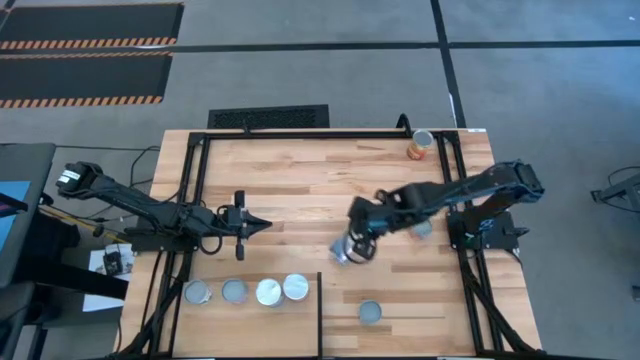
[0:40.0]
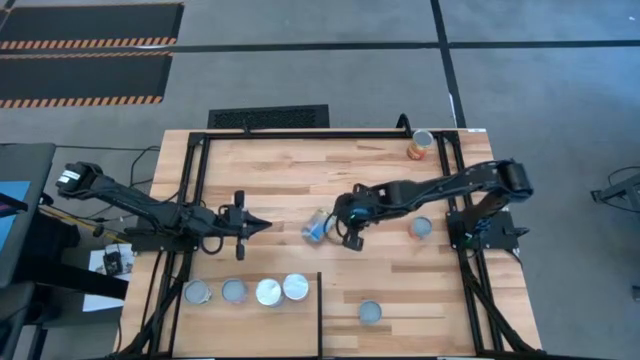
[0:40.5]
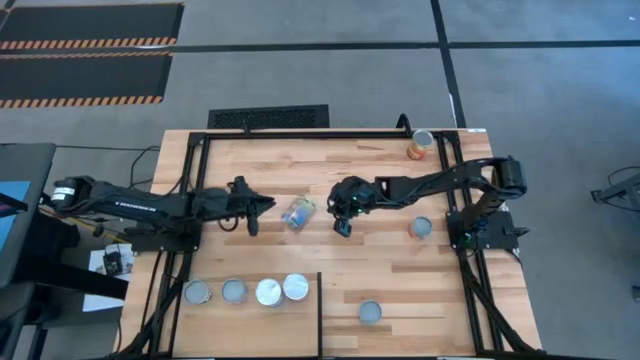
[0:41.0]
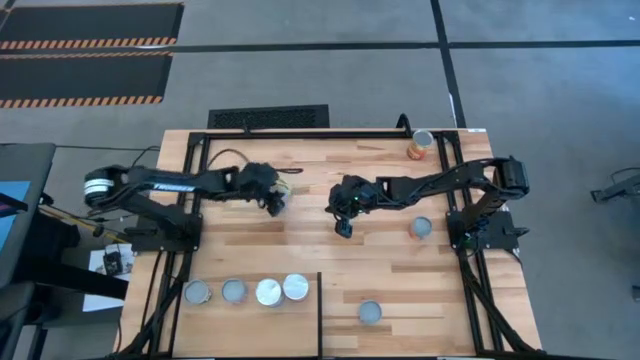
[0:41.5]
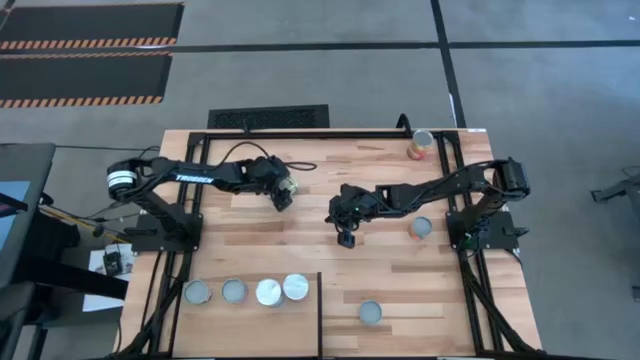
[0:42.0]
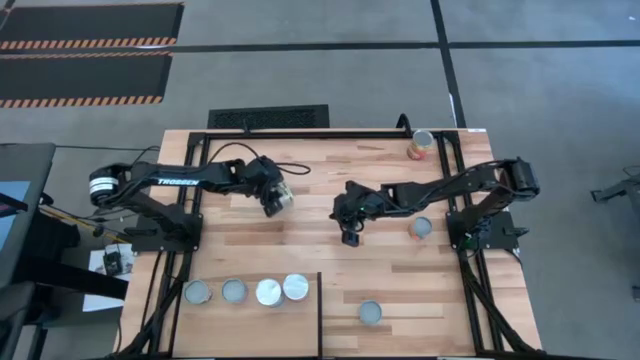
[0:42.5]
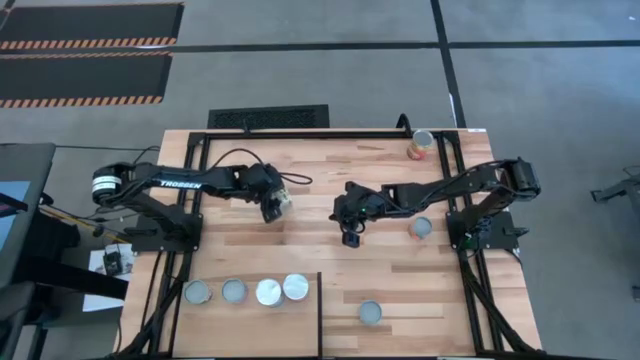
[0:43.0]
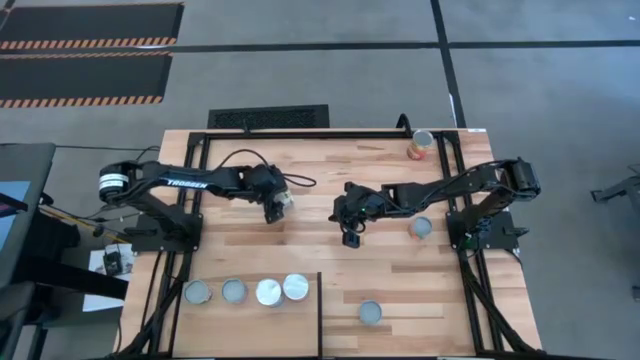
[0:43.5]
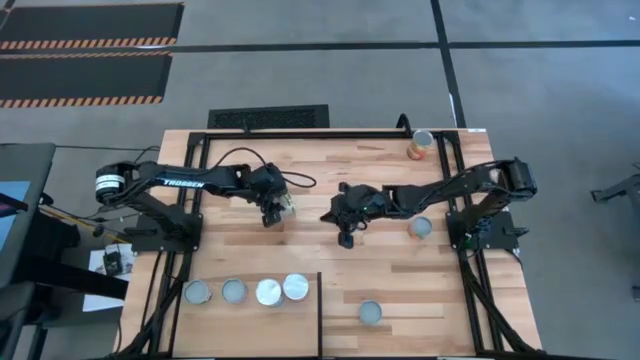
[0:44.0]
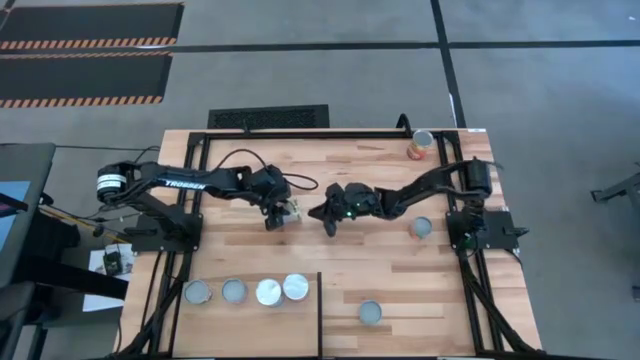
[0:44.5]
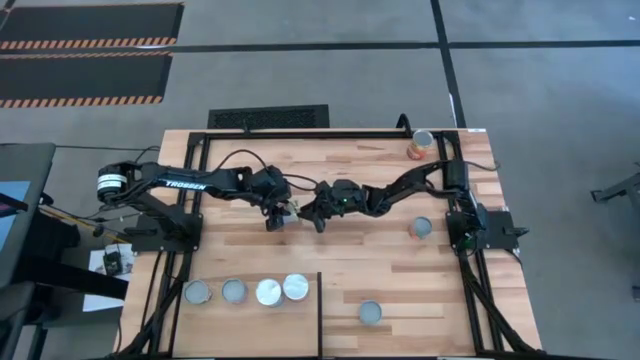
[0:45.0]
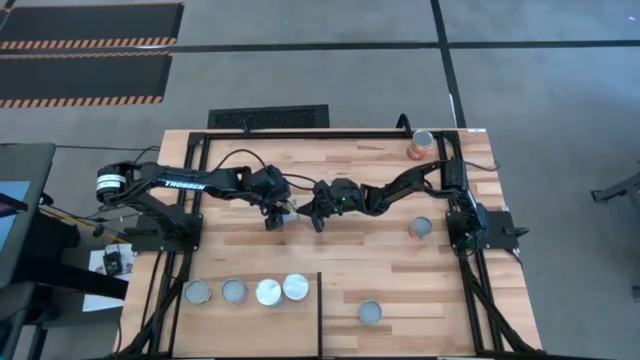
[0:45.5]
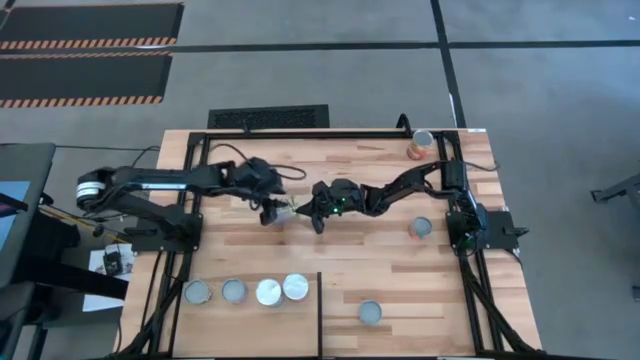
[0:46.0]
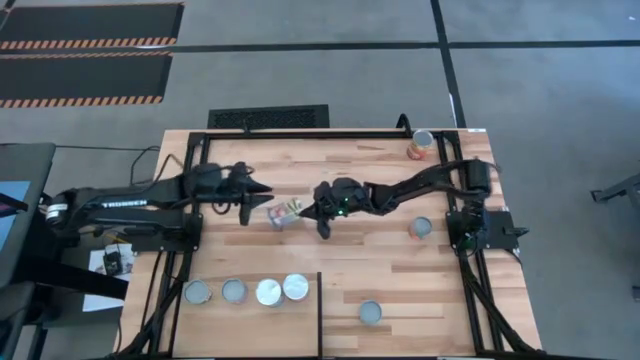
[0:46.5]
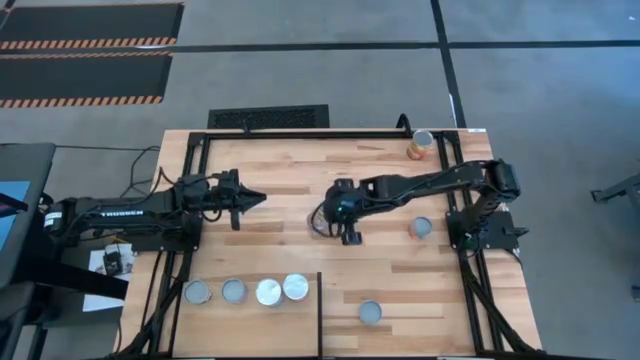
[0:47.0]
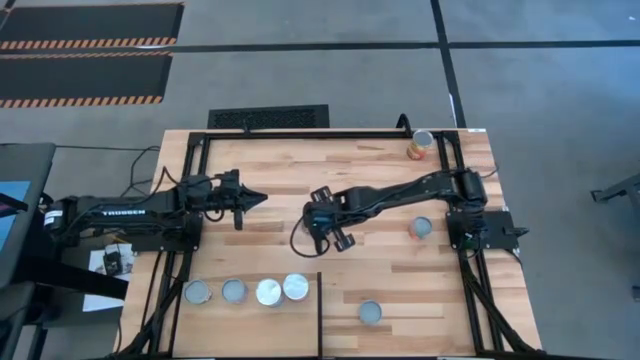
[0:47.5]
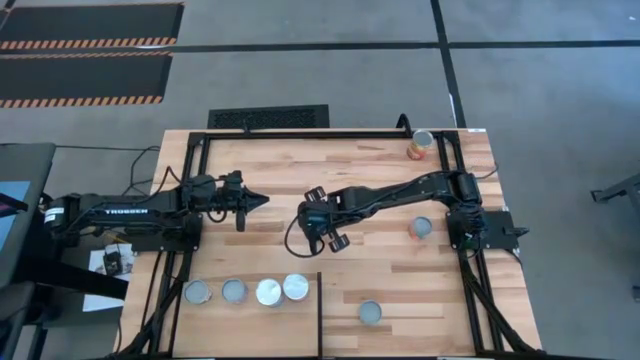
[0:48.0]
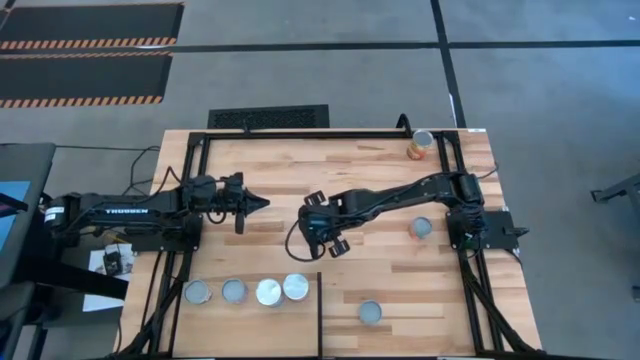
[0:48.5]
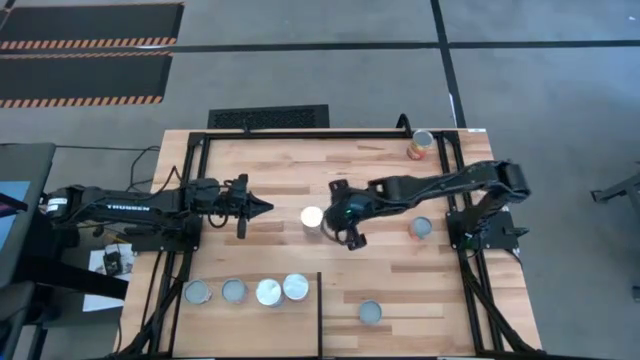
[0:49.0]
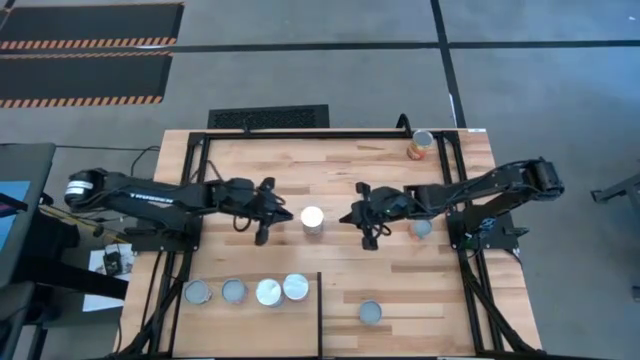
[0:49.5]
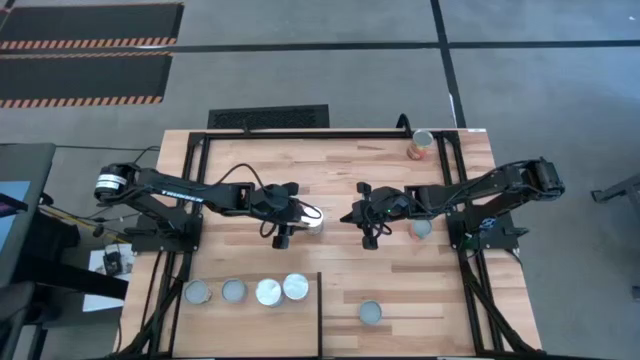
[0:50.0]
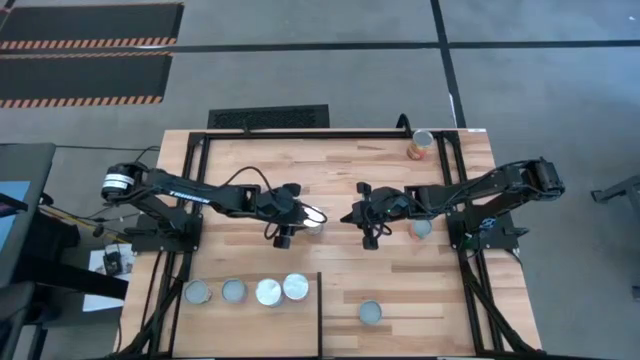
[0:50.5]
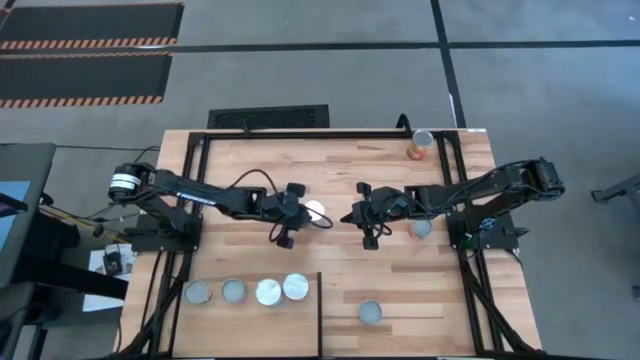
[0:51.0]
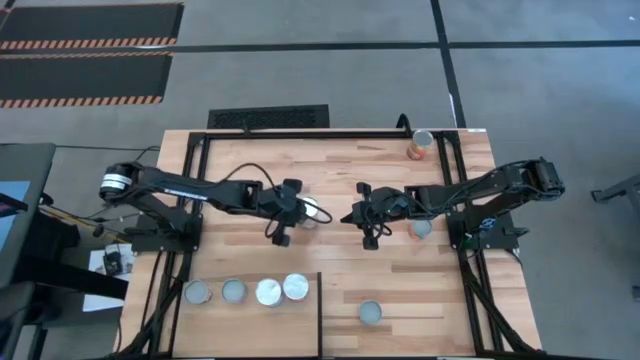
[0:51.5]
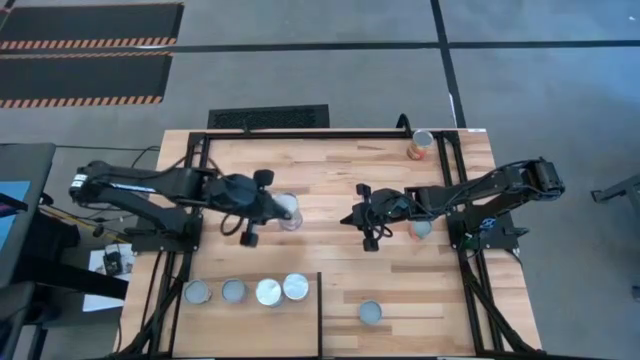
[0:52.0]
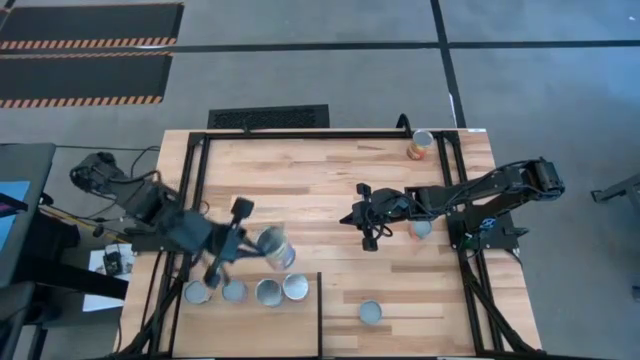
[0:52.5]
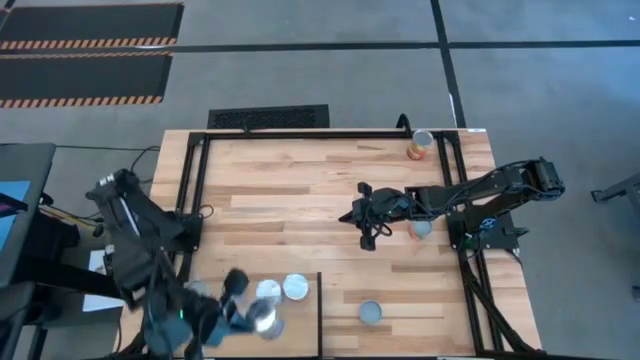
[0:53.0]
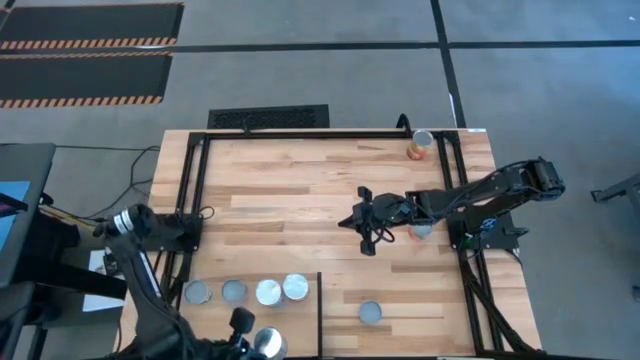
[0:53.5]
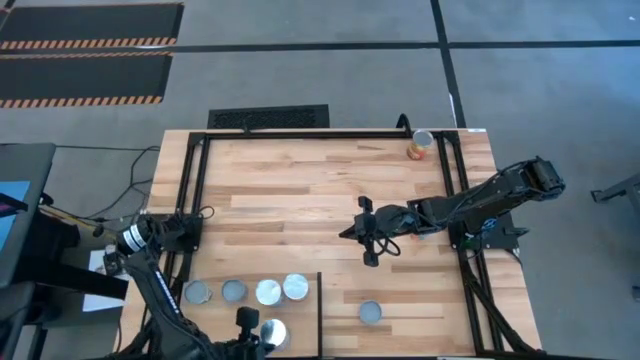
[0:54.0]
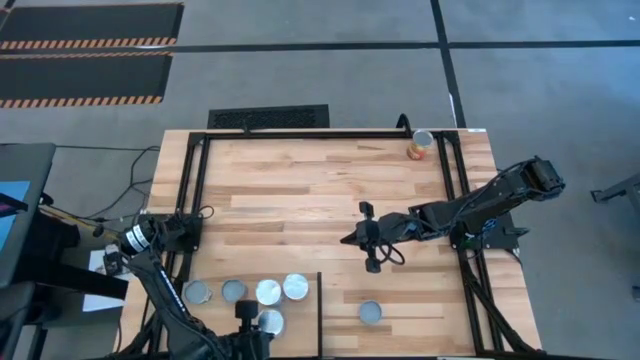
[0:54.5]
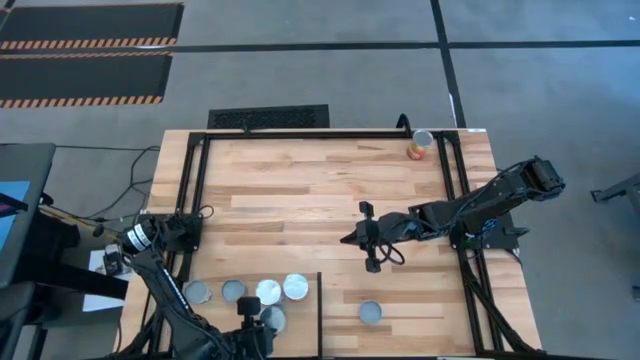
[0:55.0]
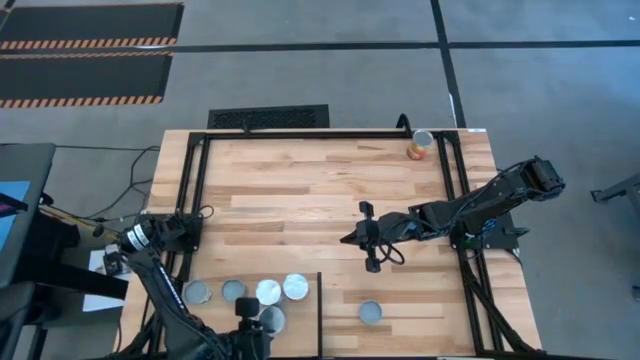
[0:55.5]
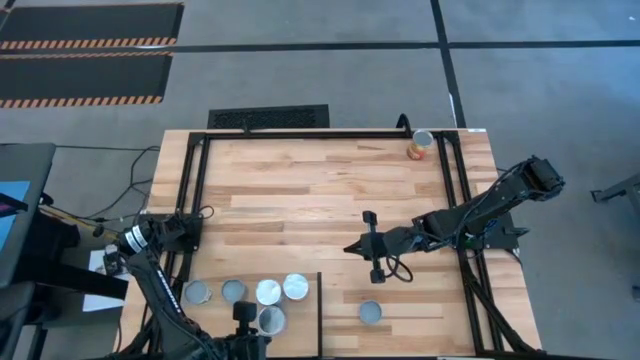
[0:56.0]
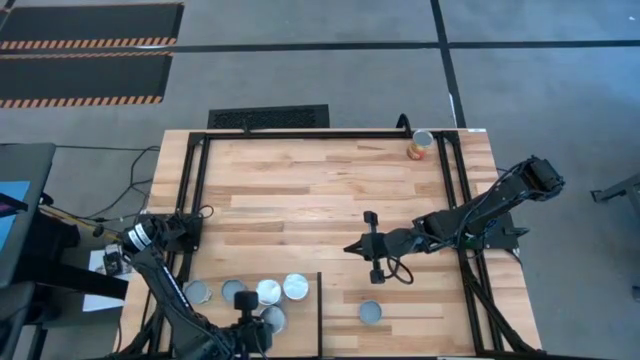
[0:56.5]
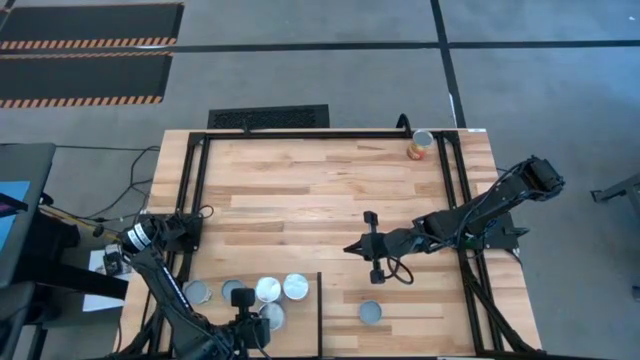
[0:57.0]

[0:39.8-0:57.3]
Task: Pick and place cans onto a shelf
Put the canned peaches can on the shelf

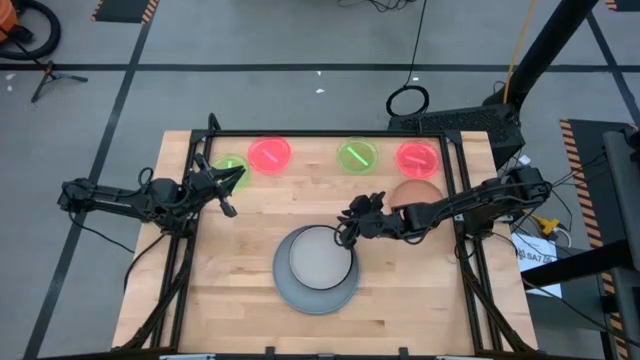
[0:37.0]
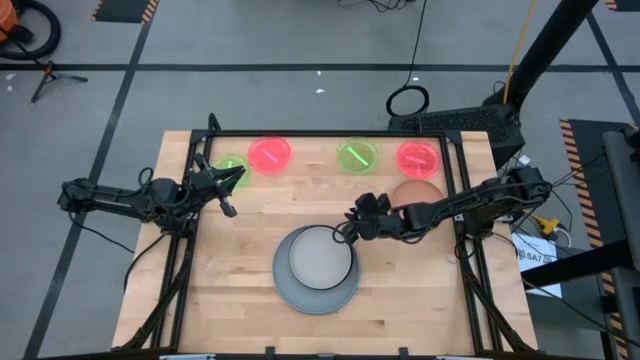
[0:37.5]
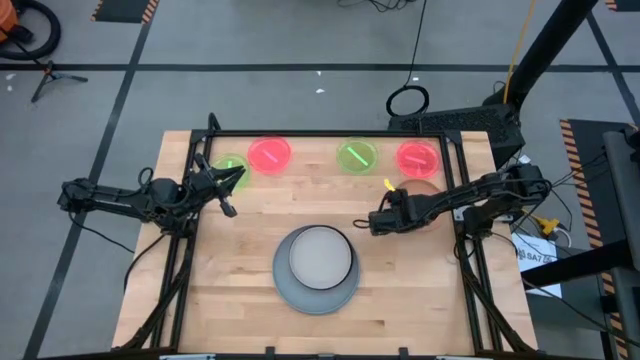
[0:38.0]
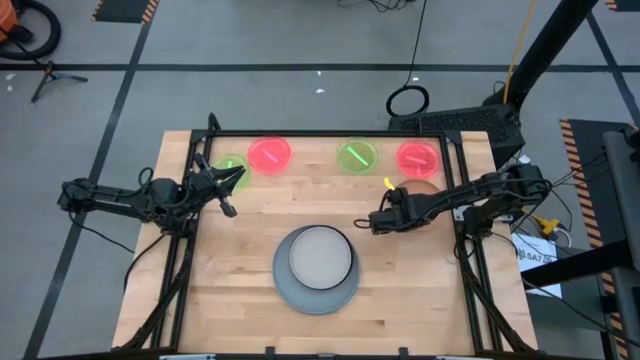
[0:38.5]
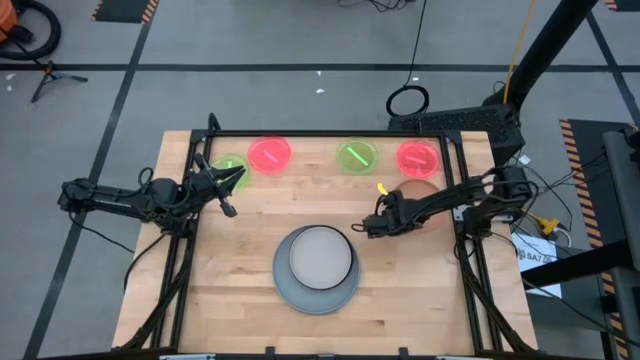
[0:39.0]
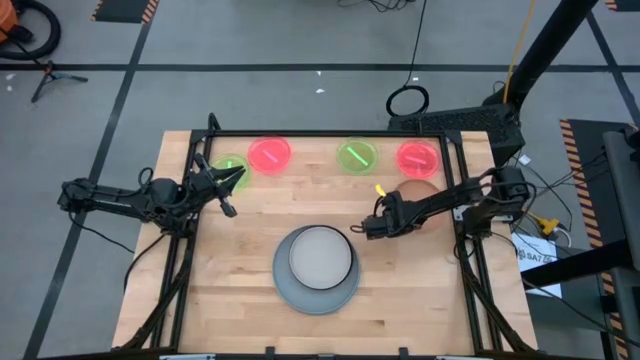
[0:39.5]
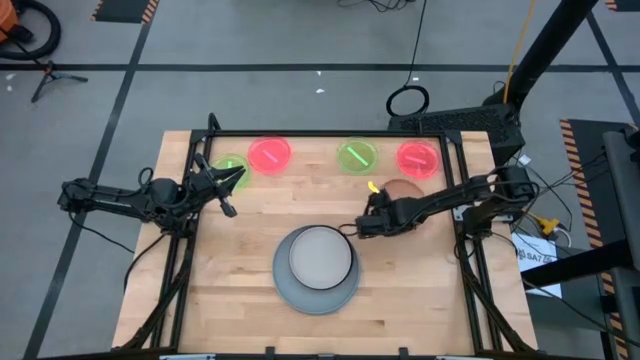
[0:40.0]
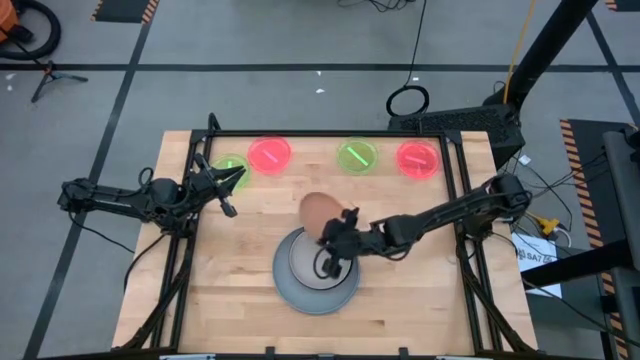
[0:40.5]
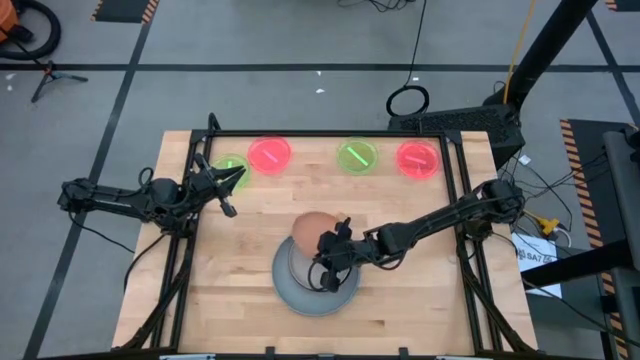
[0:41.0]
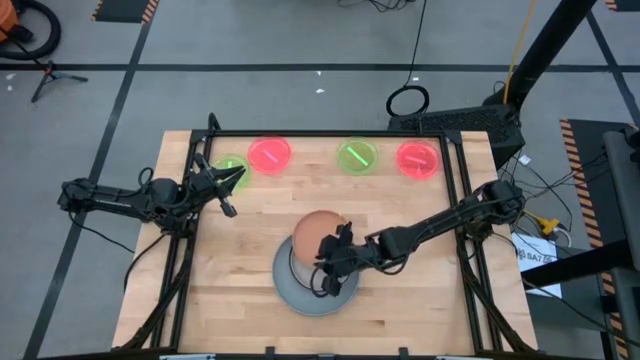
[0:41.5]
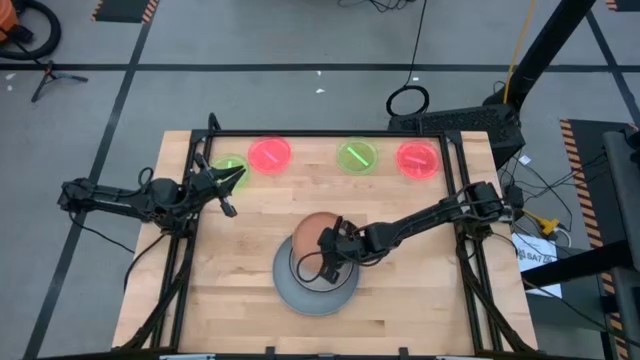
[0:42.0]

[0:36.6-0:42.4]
Task: Stack plastic plates
Stack the brown plate on top of the white plate
